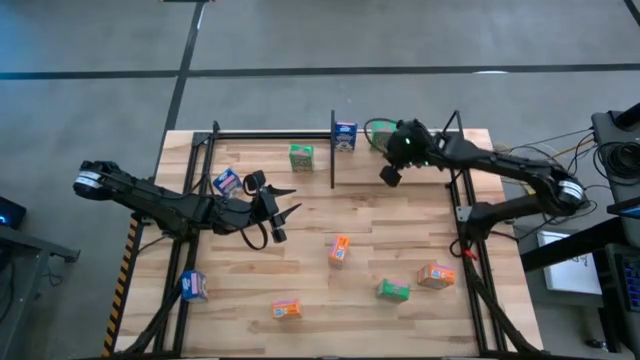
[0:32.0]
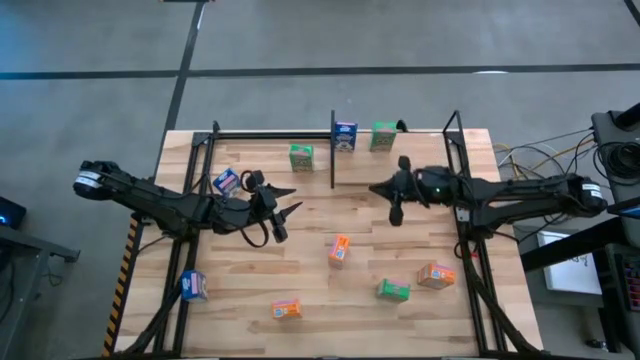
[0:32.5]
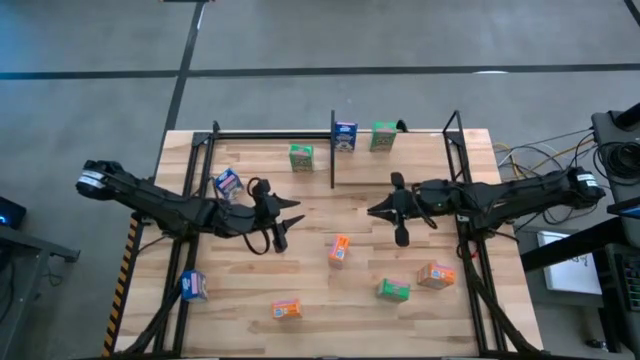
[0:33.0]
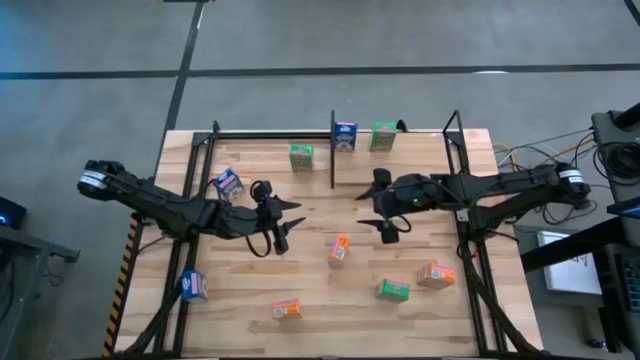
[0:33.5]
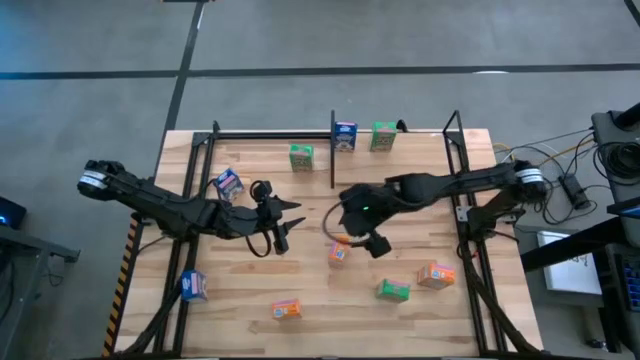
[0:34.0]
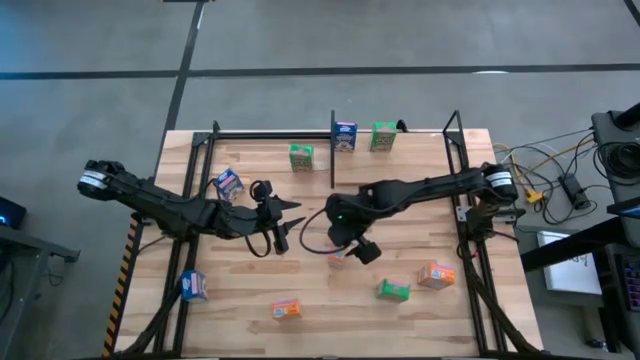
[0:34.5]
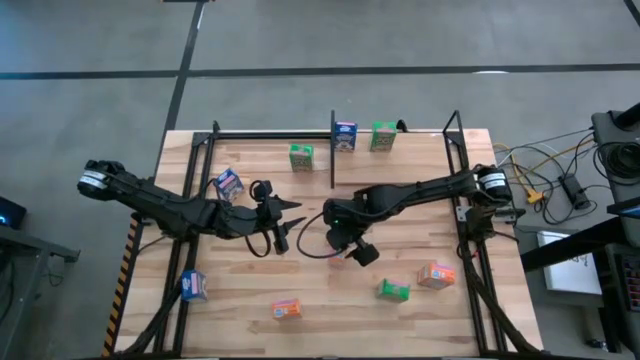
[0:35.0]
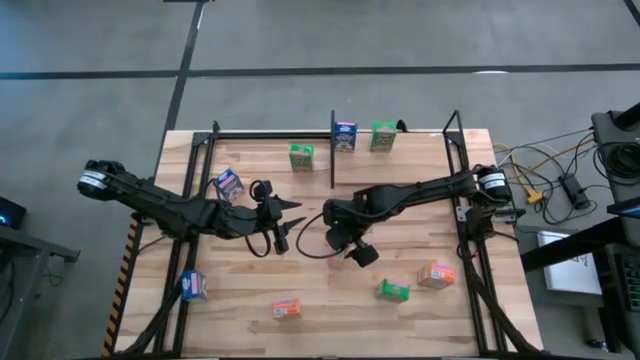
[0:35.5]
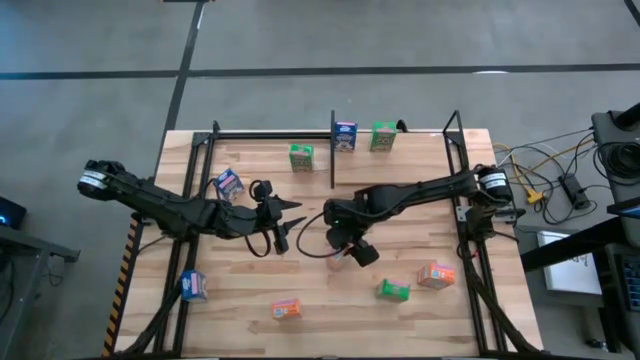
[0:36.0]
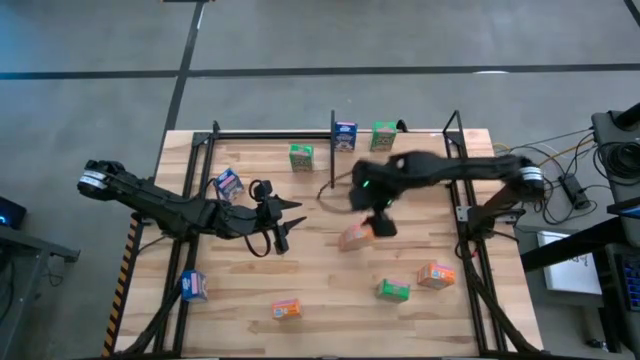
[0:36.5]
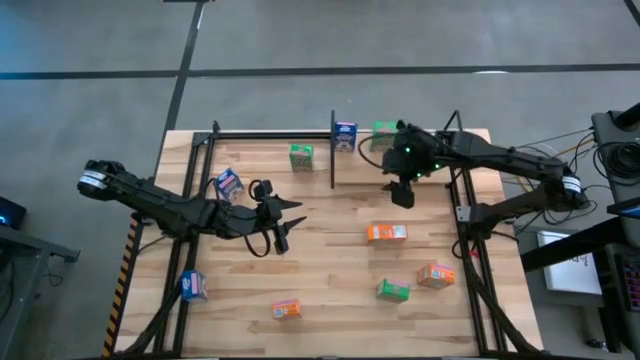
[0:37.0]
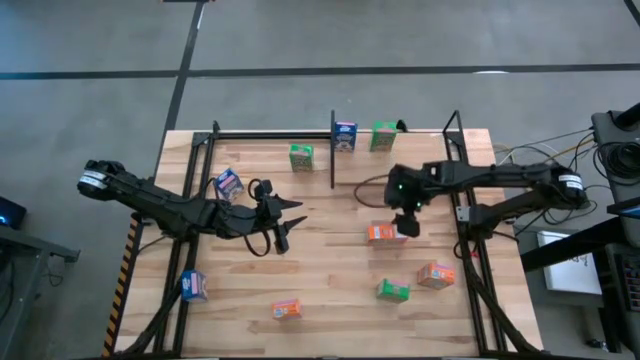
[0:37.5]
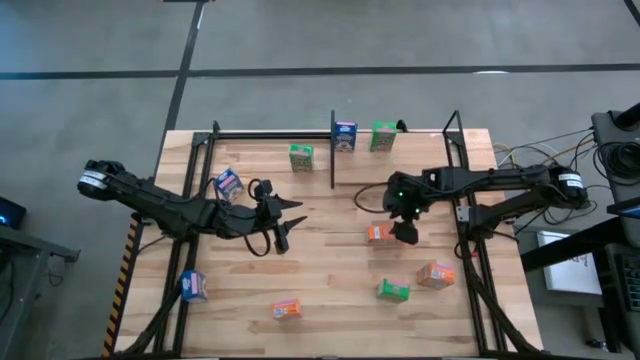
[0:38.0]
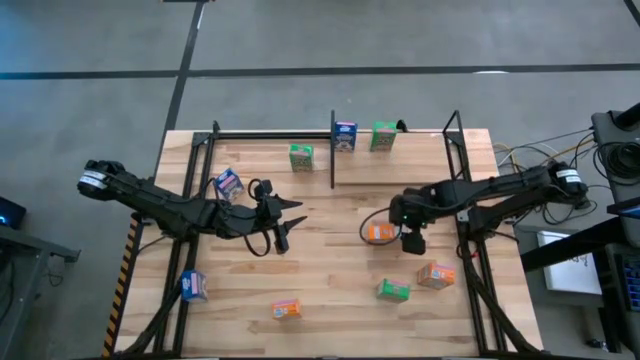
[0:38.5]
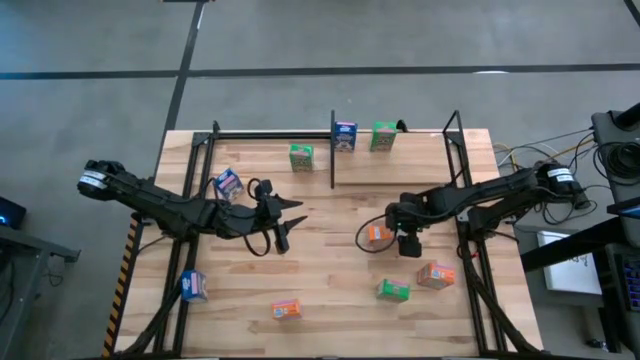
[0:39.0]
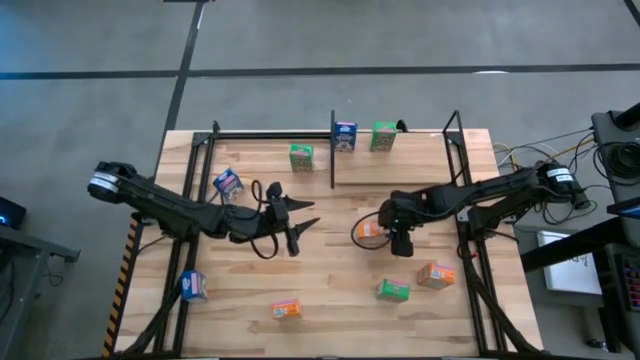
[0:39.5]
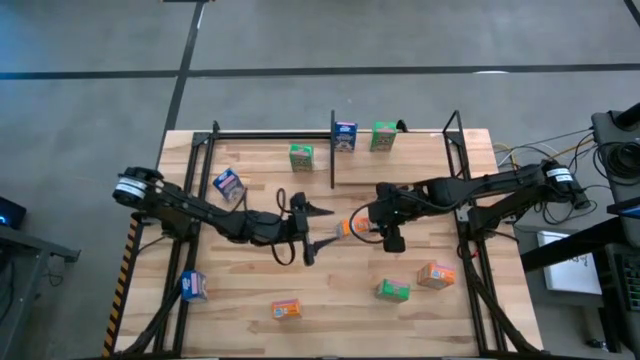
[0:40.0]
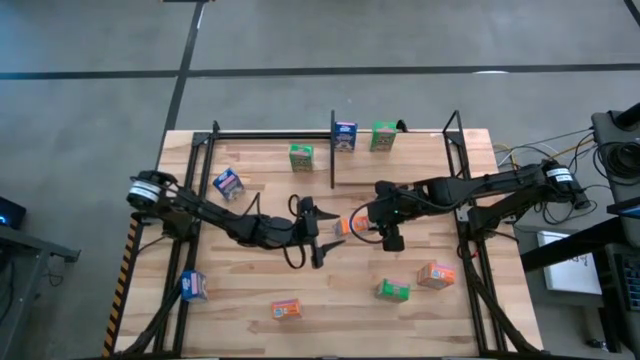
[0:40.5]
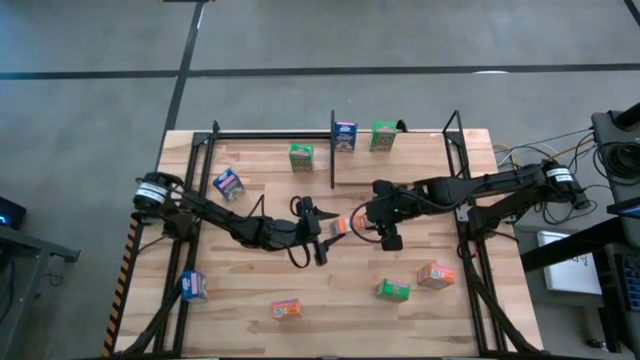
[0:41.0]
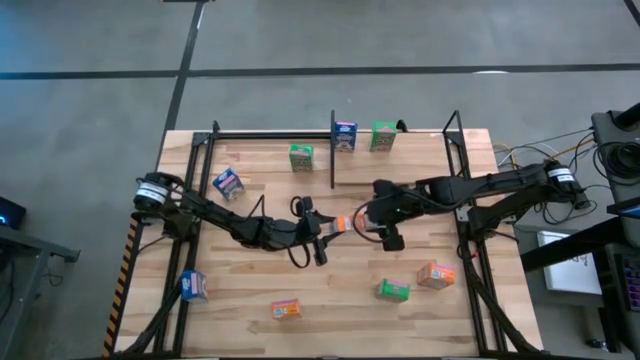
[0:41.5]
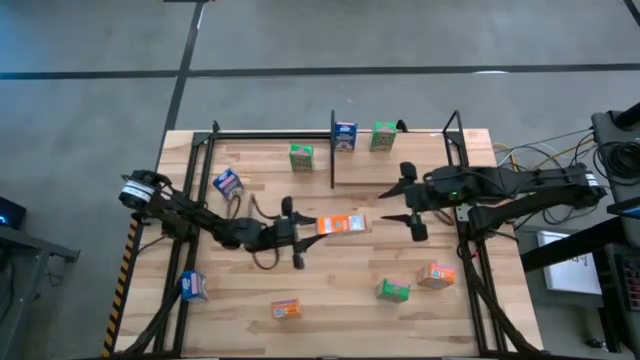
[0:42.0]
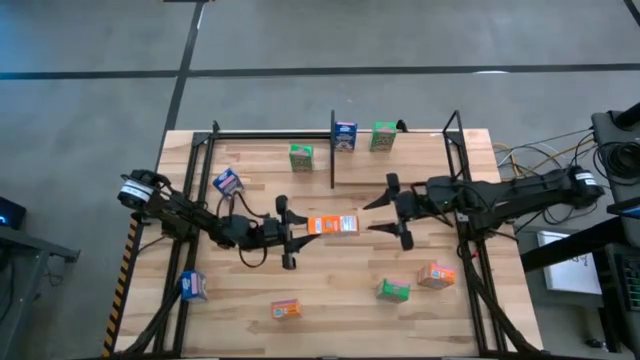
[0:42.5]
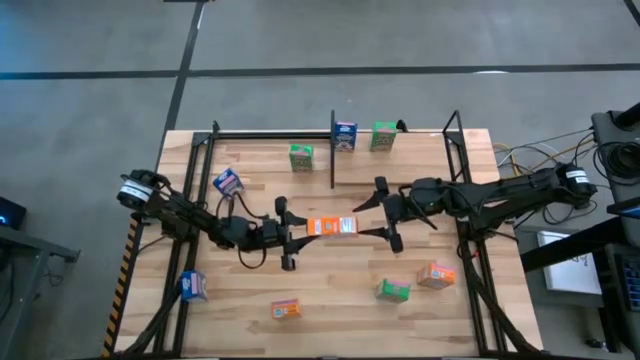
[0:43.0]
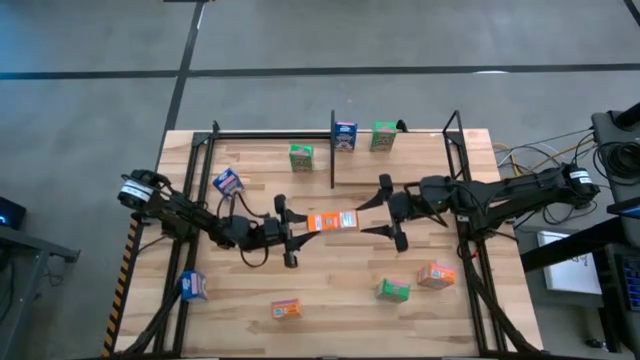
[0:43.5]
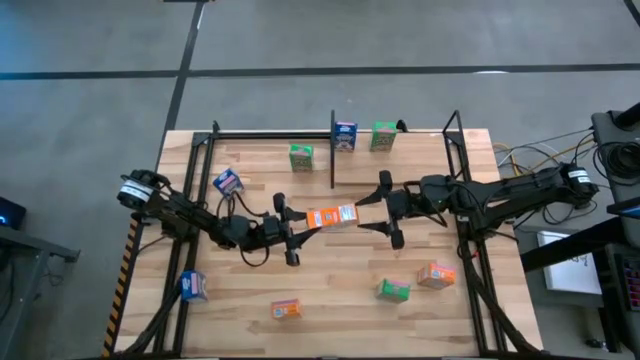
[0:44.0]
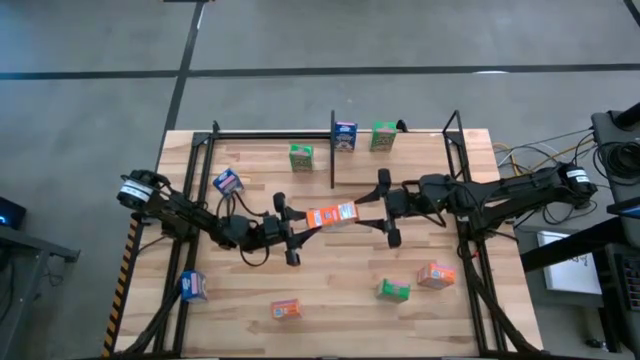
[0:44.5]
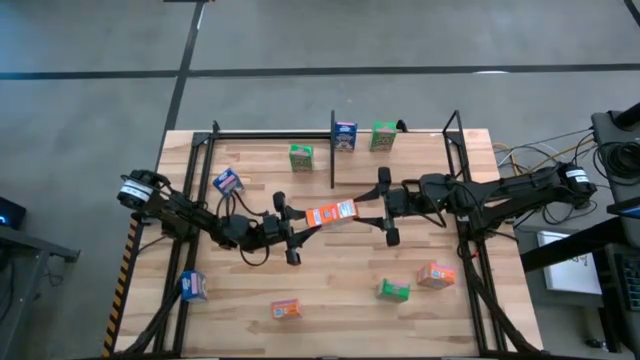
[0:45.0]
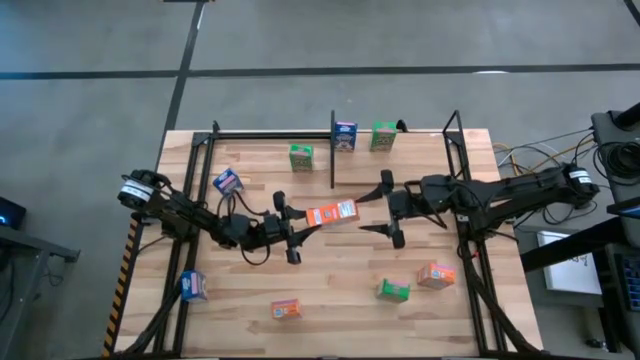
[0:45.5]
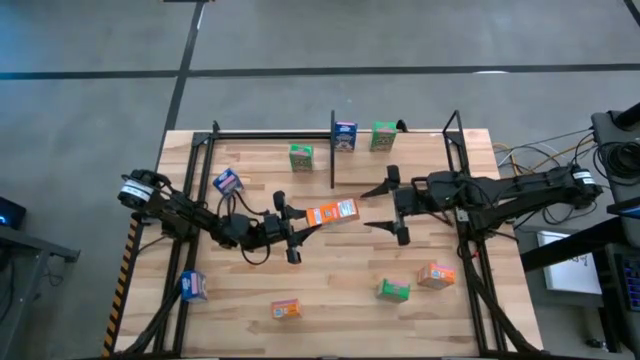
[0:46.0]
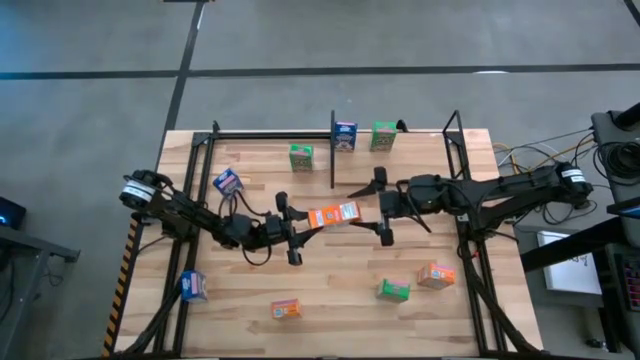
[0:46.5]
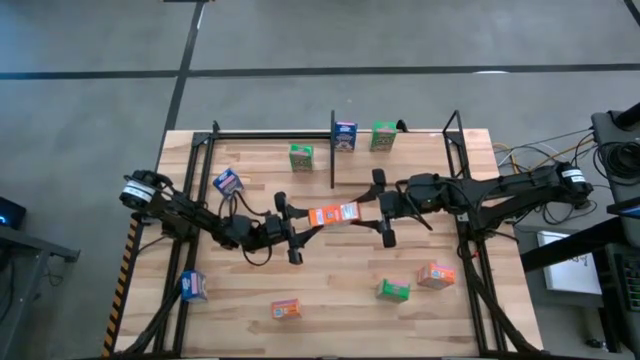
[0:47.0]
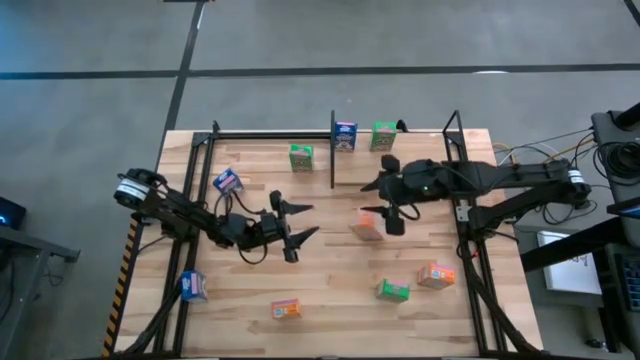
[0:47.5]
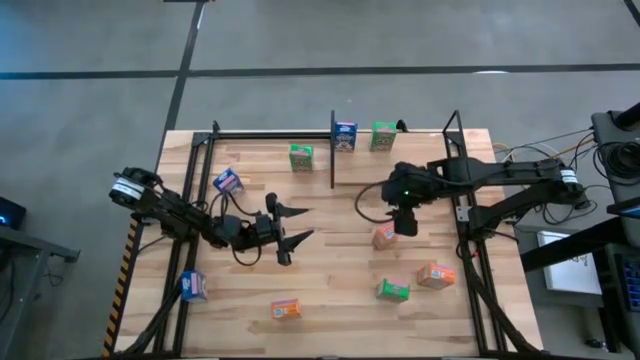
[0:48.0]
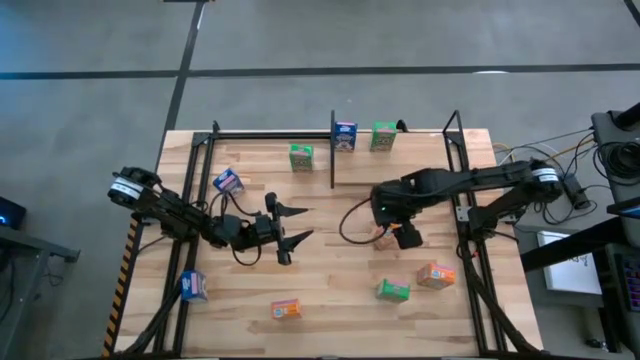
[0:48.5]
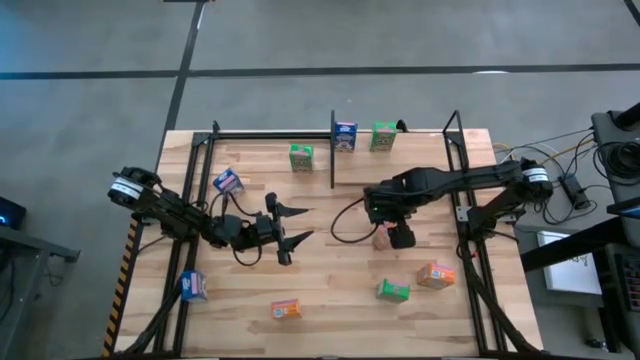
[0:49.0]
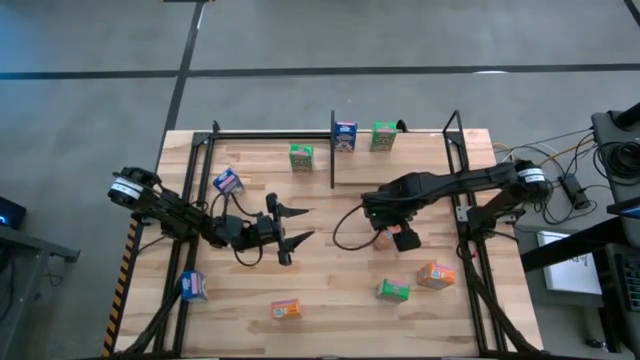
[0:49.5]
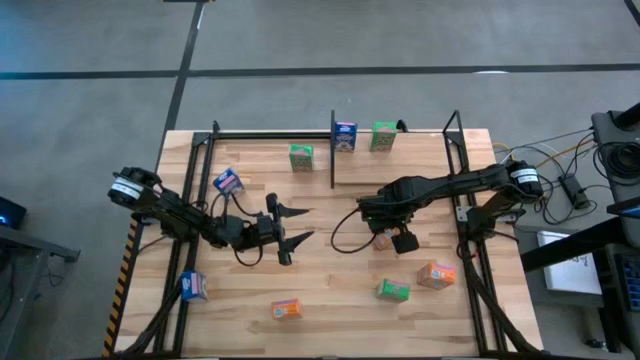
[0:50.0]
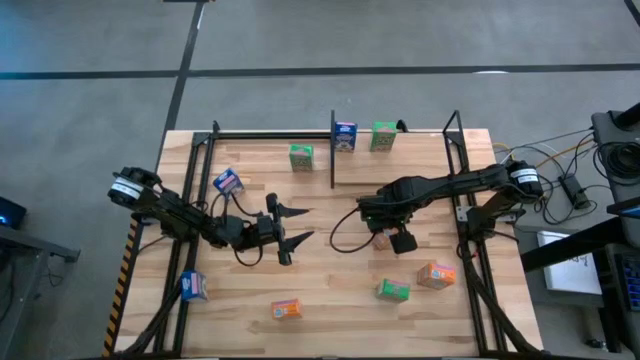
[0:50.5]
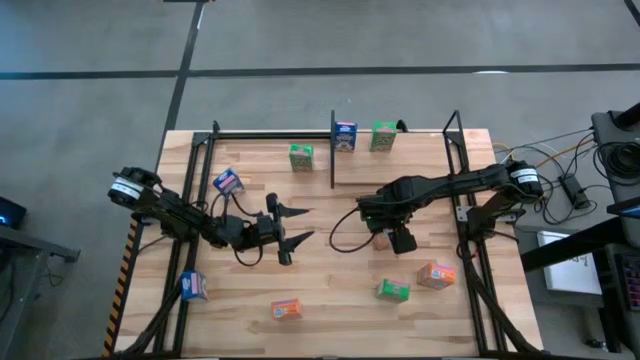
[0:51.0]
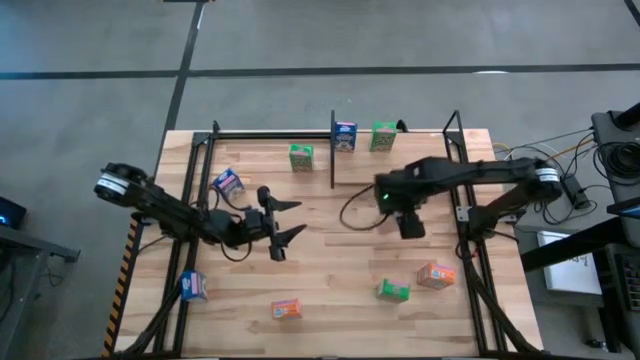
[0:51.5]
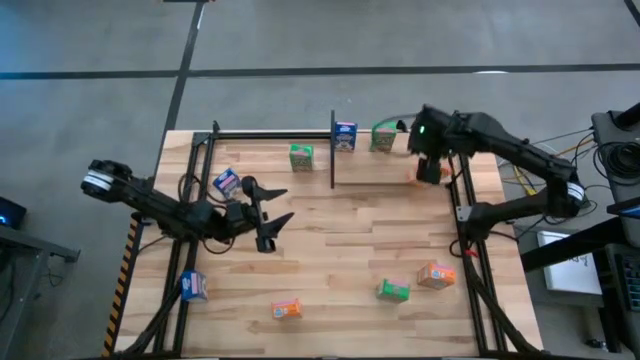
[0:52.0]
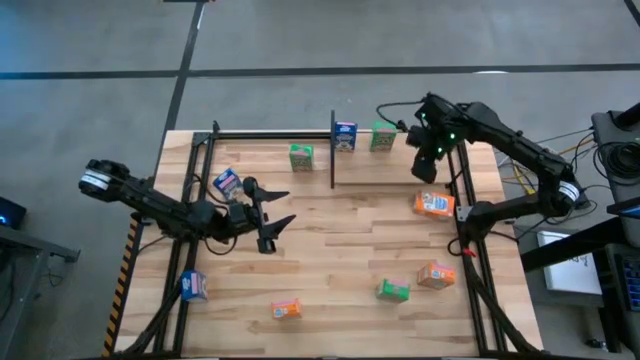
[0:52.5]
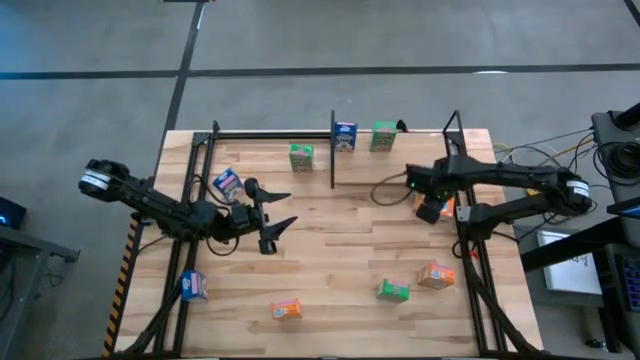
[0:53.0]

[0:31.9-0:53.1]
Task: Stack cereal on shelf
Put the center orange cereal box on the shelf
